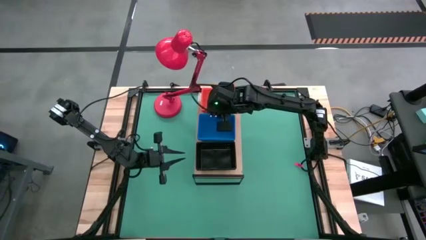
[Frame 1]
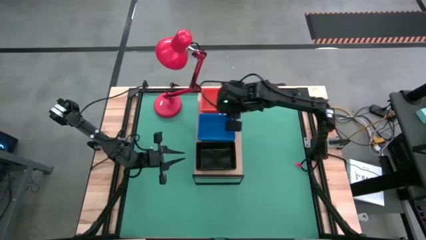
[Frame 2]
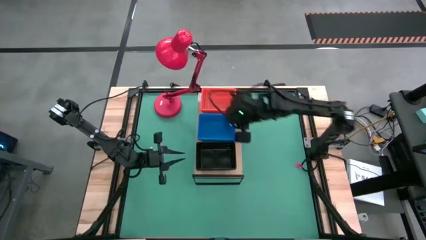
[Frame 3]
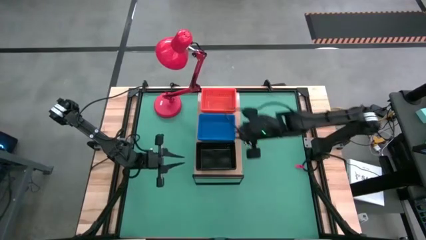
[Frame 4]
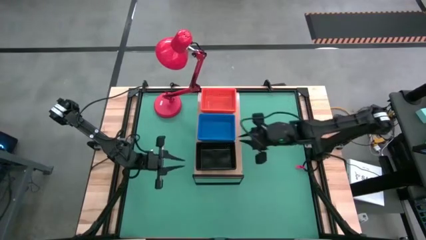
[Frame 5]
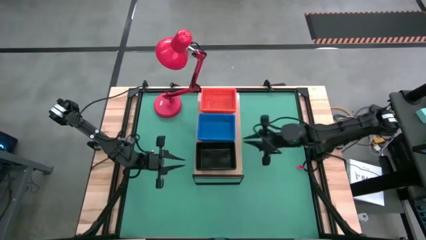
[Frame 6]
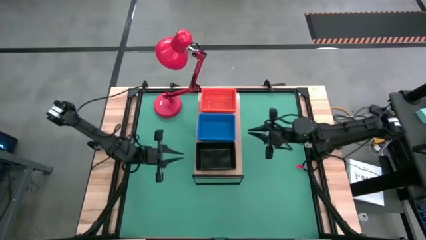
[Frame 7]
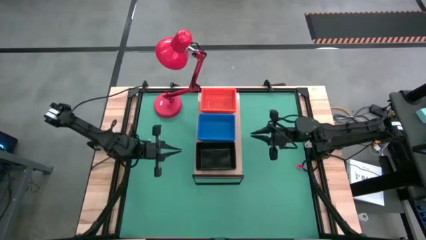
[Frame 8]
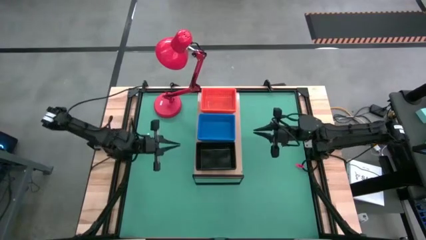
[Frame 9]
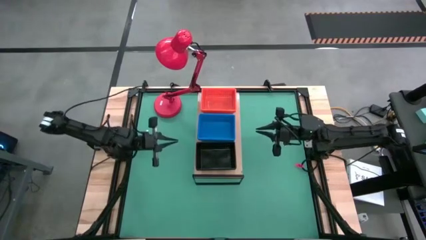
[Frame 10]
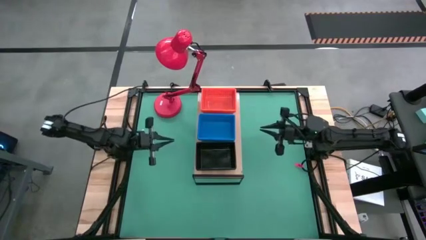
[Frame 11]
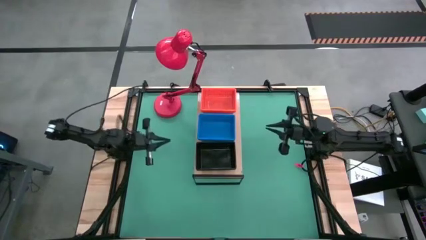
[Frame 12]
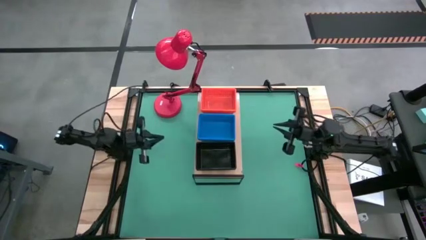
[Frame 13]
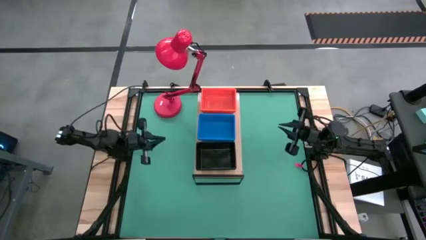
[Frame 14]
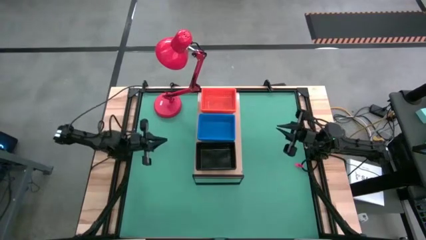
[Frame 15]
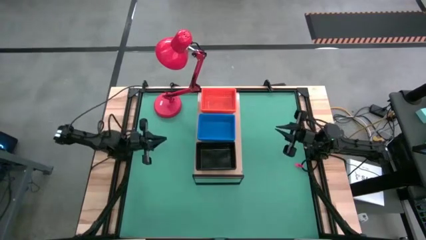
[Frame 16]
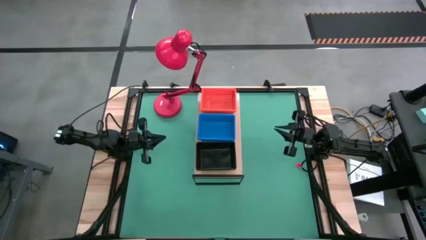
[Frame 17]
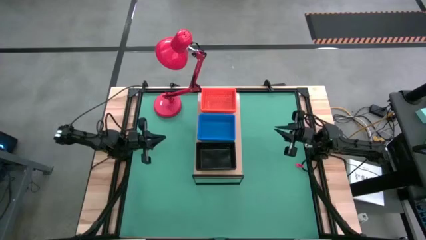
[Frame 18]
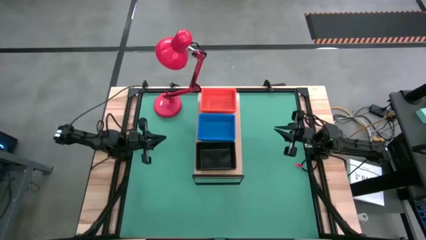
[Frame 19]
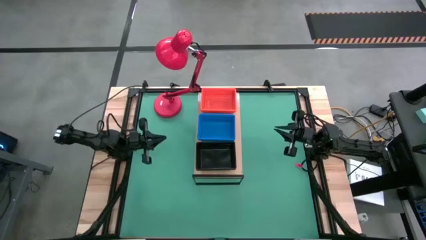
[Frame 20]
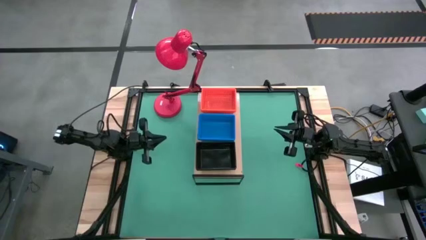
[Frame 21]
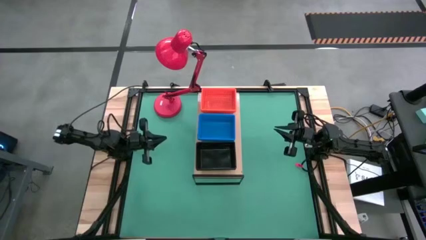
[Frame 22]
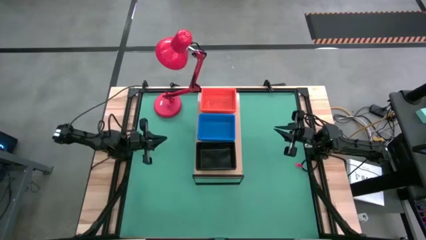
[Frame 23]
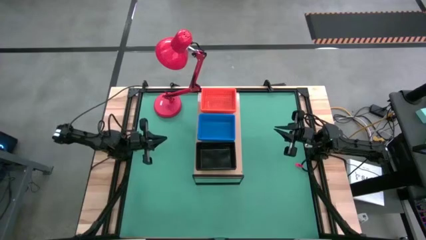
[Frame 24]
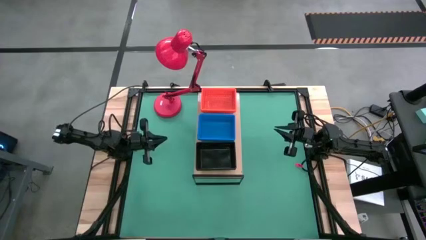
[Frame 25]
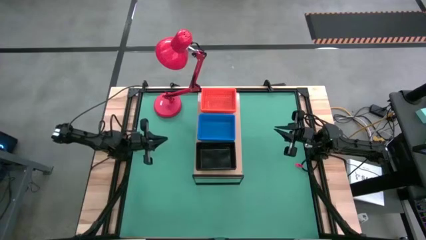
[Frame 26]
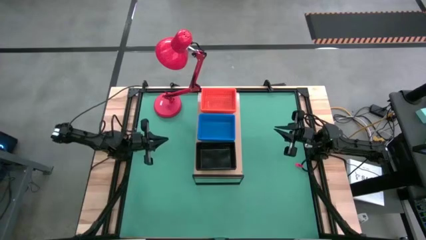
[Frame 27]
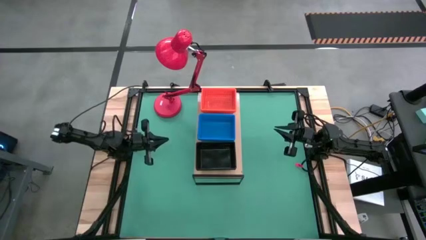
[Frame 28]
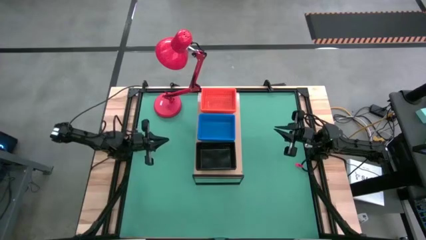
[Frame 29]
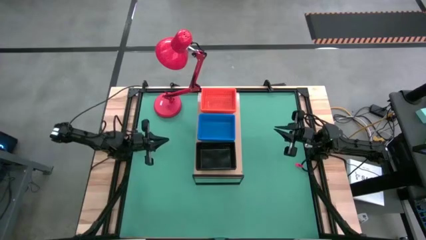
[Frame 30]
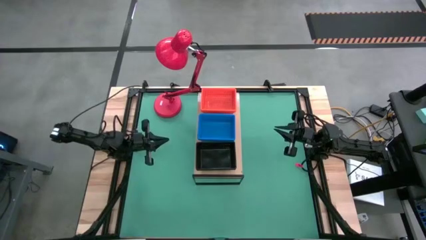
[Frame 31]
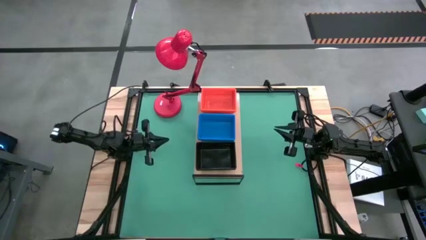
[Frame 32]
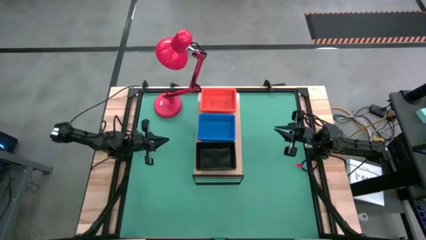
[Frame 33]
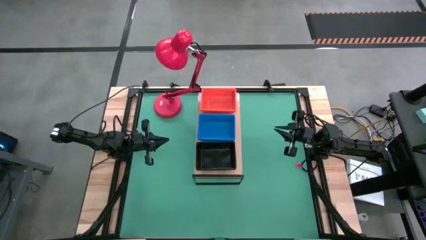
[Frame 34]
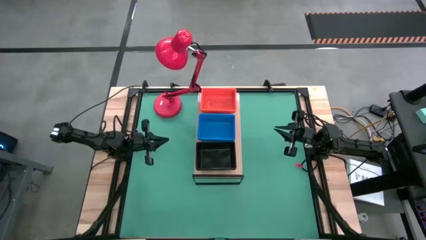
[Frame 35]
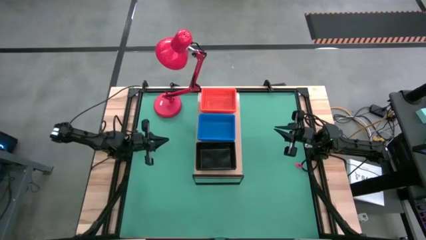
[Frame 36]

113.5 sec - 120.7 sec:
Task: Stack baskets on shelf by color
Return to Home Position

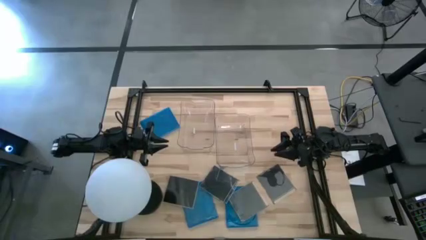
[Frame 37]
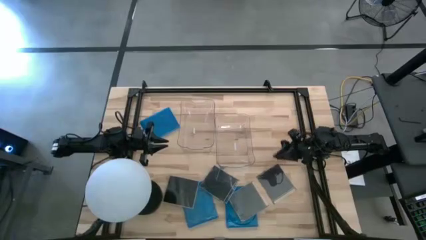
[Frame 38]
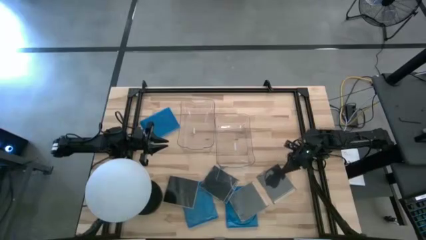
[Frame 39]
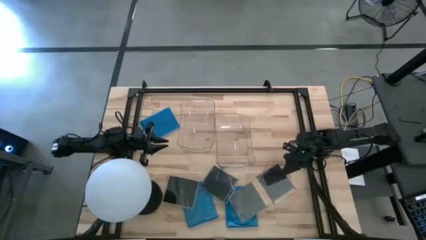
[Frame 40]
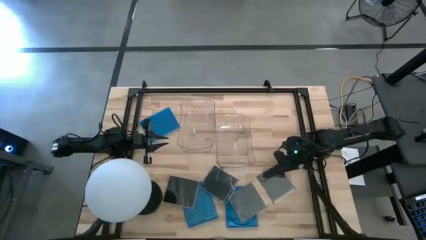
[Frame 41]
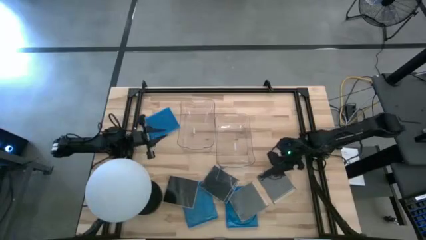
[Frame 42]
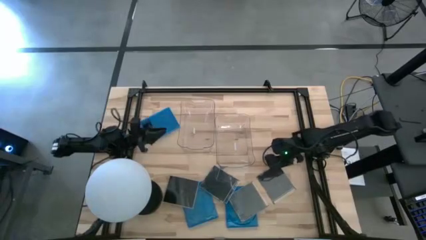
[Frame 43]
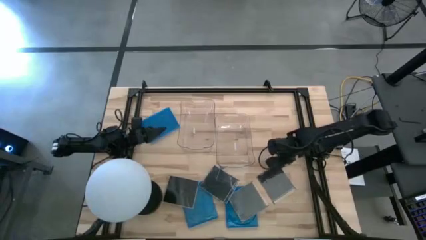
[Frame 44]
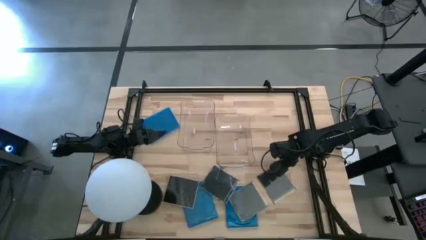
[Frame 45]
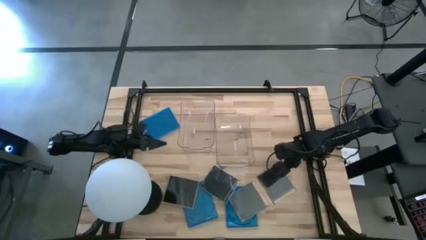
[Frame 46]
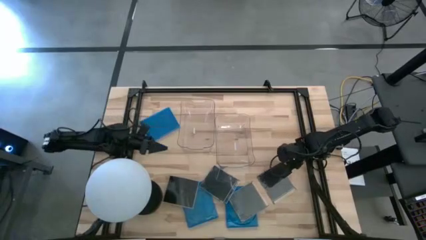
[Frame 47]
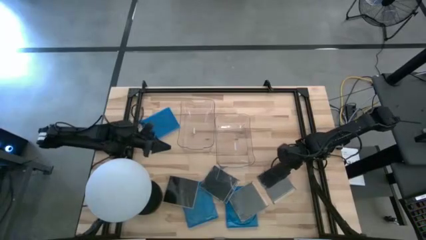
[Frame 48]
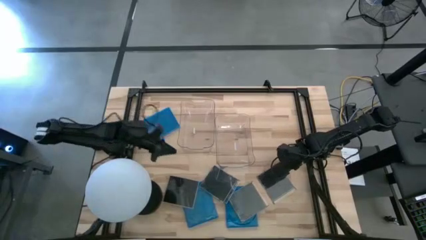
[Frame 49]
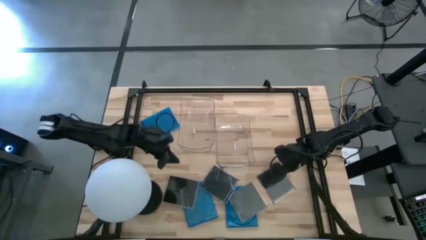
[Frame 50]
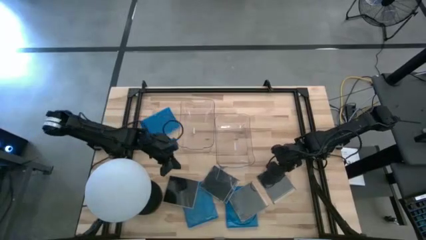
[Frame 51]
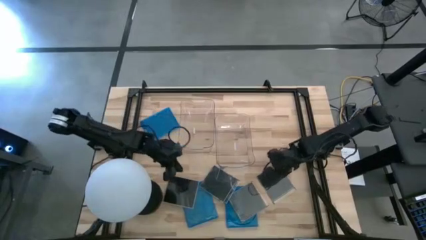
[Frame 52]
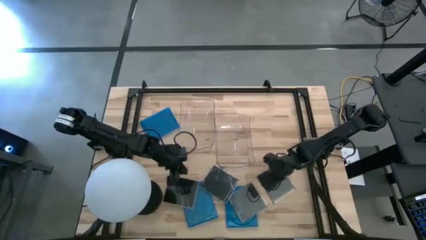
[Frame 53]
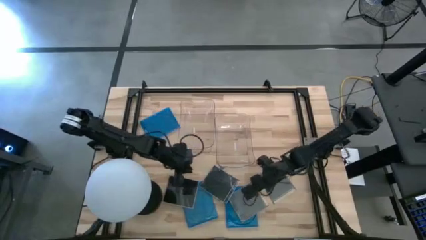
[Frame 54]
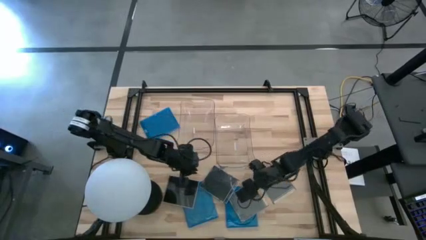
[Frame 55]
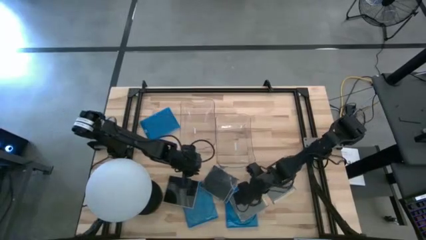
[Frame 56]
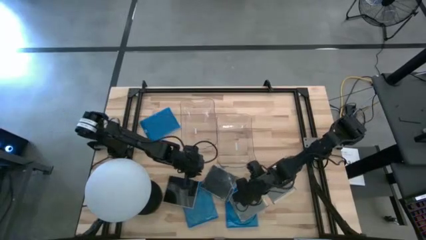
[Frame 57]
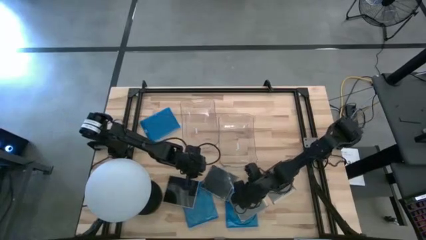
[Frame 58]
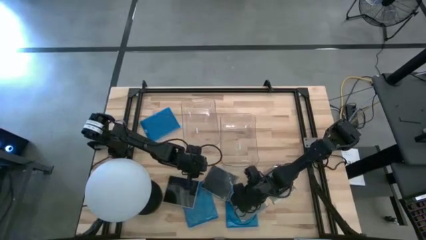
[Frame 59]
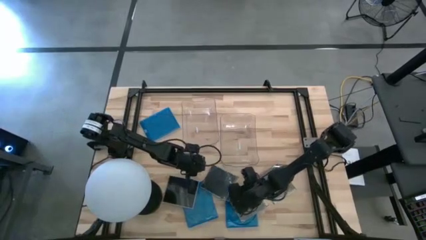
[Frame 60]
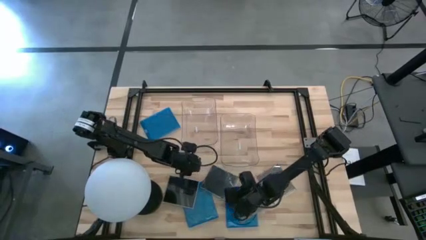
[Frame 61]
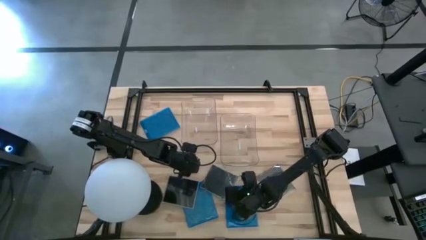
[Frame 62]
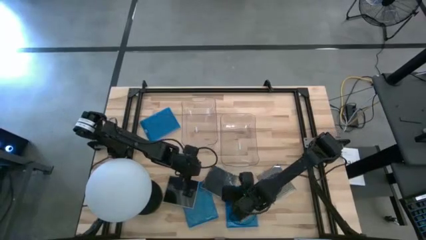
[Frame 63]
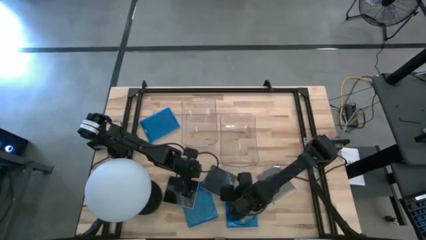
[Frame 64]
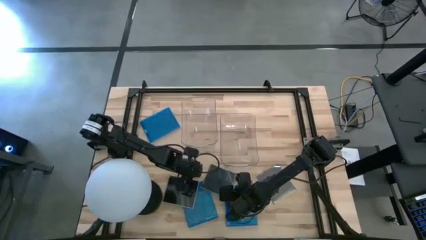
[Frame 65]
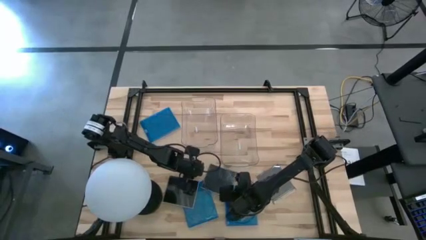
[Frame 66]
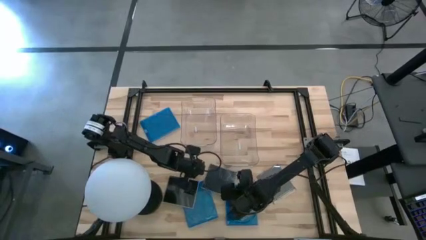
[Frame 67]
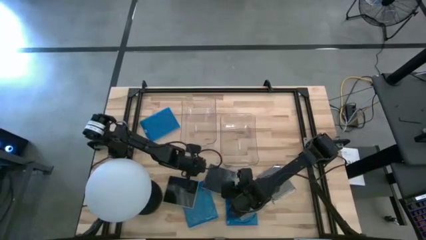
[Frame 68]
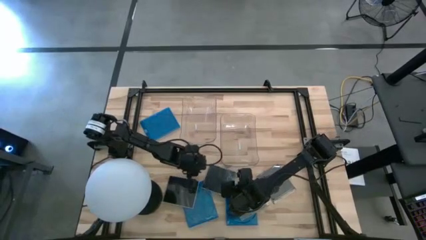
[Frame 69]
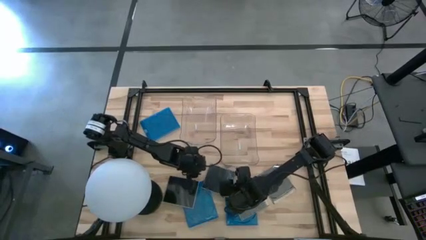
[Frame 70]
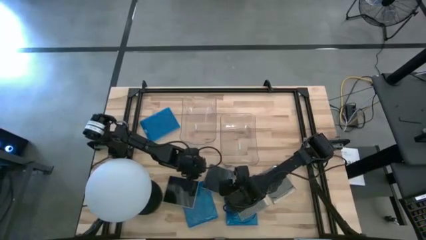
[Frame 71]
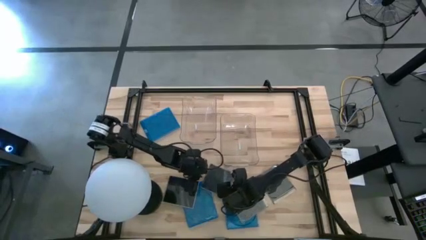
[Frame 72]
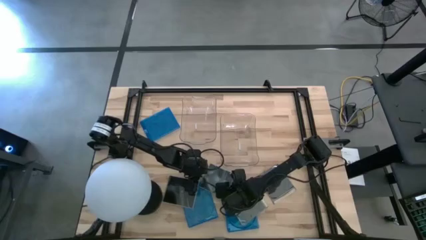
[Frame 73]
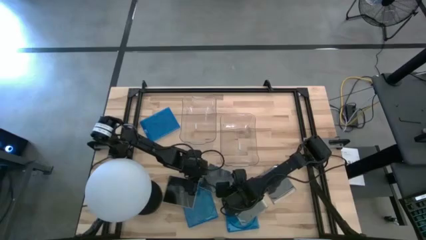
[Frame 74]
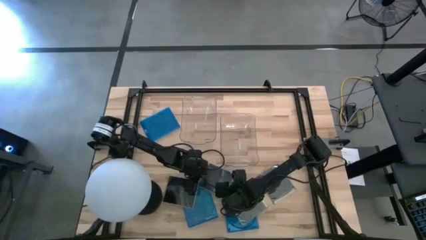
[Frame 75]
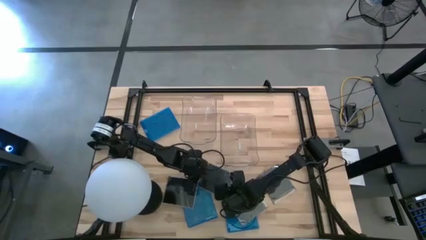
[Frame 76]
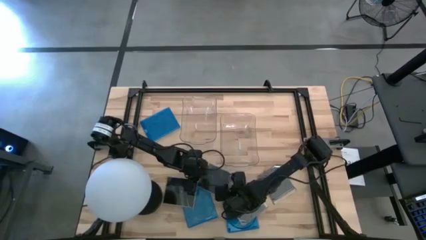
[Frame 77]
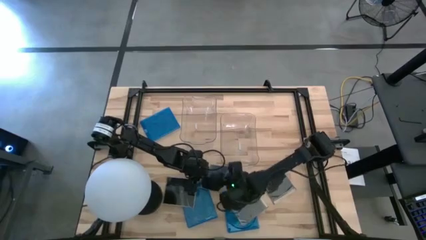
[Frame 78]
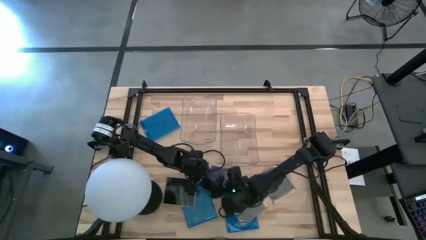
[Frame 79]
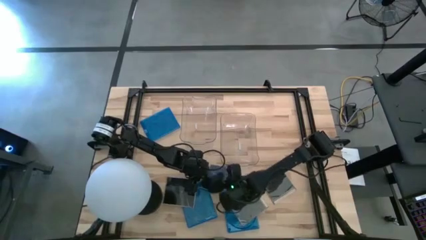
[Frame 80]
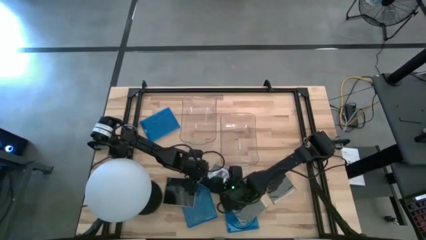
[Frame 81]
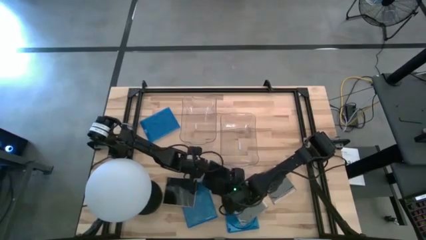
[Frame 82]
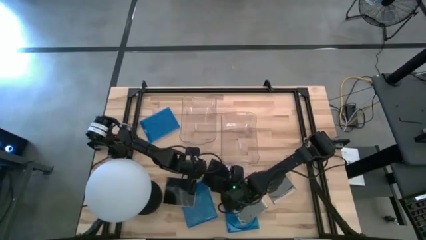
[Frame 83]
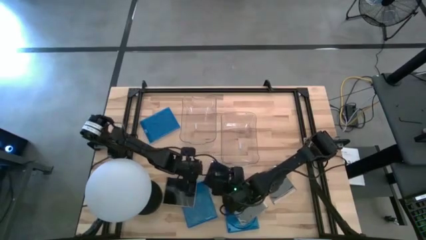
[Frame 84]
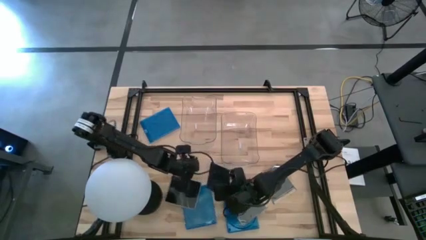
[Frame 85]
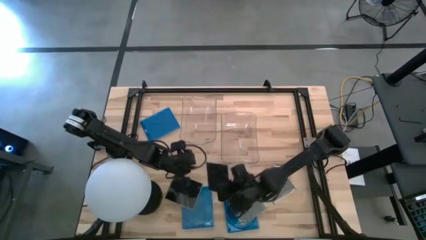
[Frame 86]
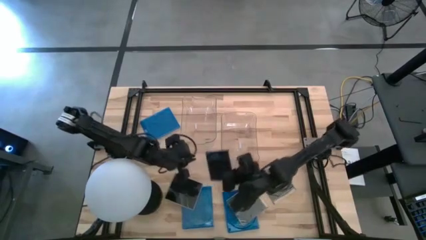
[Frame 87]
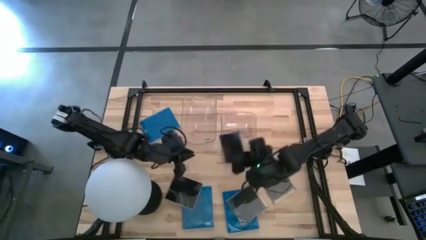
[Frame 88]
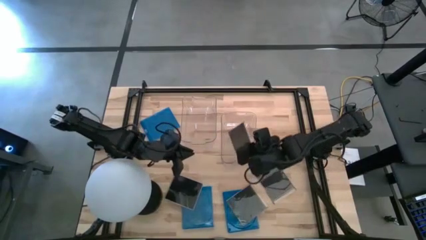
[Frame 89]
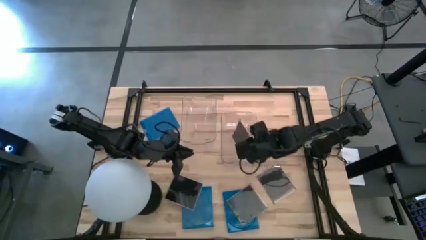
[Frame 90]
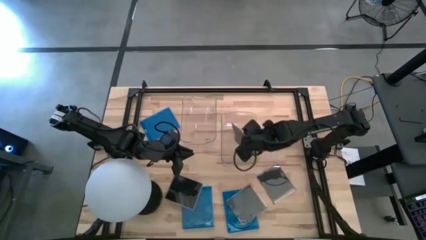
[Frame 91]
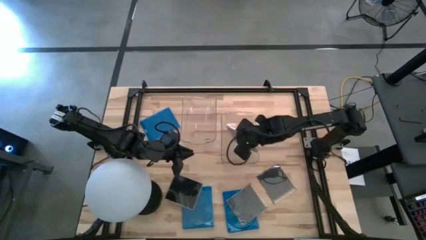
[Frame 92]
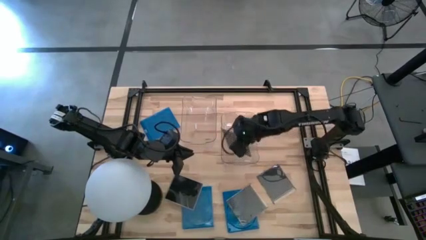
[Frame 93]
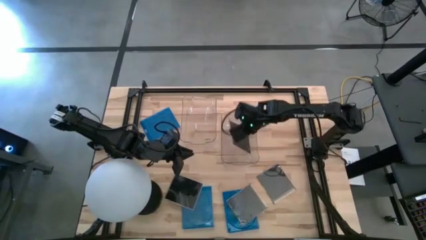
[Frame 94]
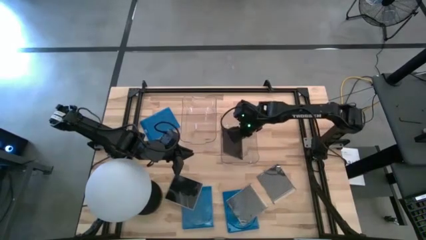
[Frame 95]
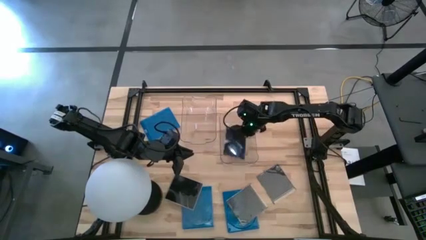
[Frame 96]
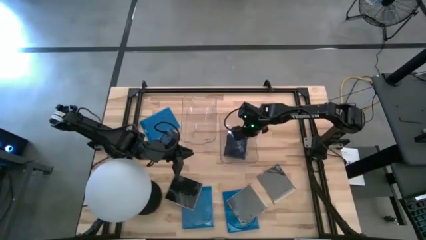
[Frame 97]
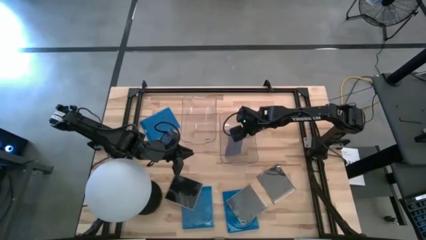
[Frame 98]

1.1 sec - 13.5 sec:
Task: Pick & place jewel cases by type
Put the black CD case into the right transparent bin
